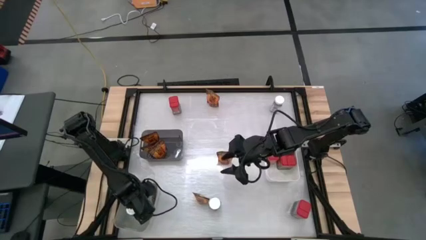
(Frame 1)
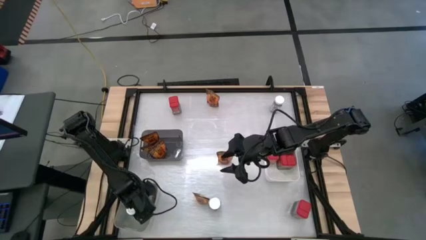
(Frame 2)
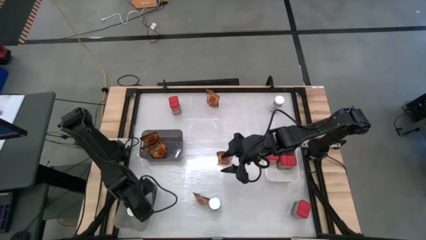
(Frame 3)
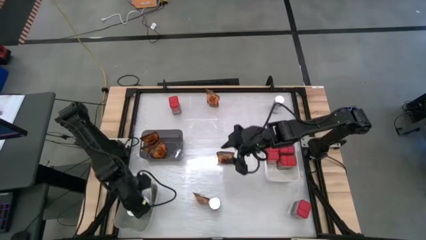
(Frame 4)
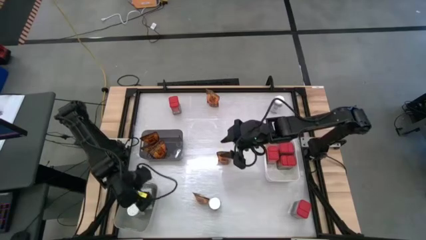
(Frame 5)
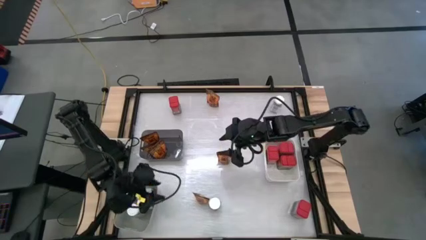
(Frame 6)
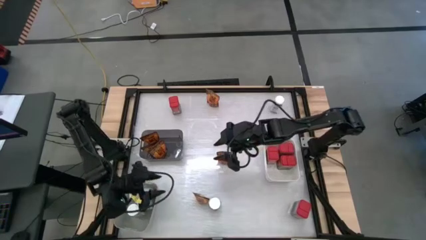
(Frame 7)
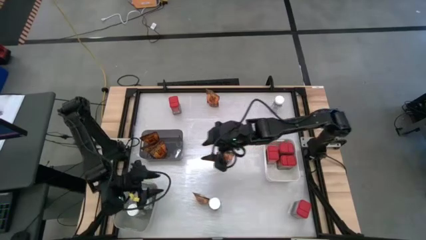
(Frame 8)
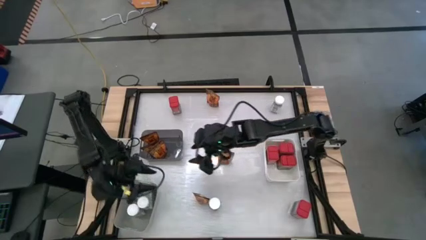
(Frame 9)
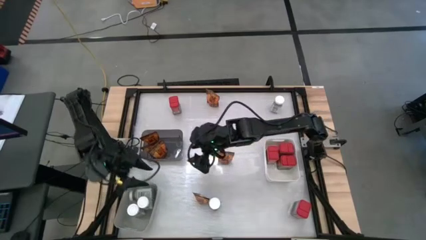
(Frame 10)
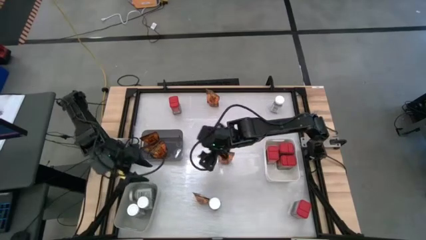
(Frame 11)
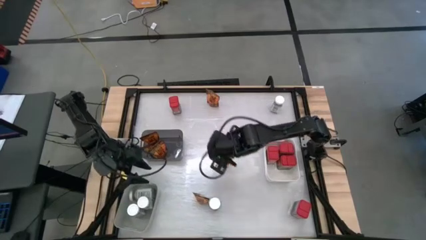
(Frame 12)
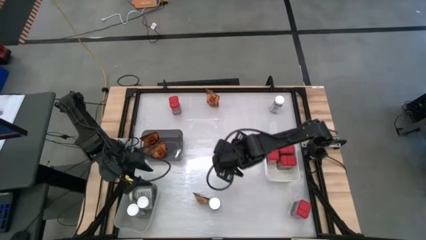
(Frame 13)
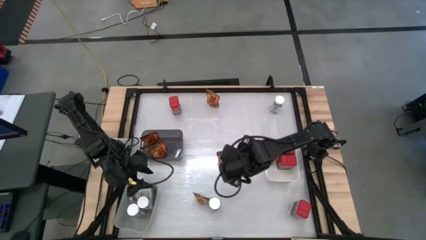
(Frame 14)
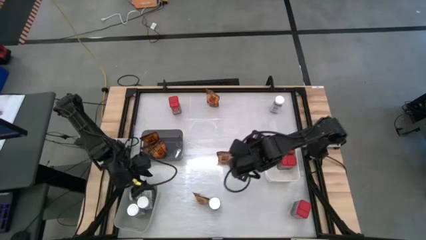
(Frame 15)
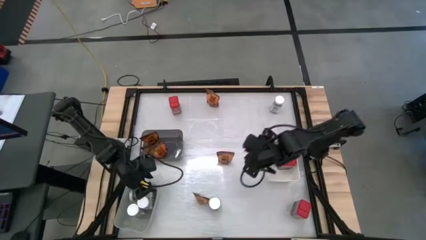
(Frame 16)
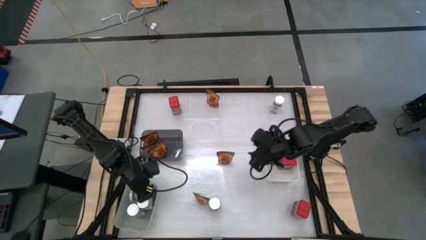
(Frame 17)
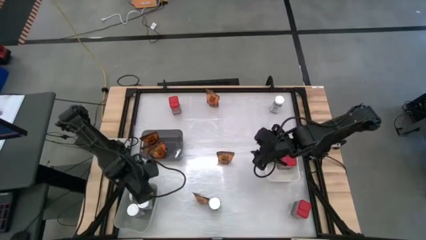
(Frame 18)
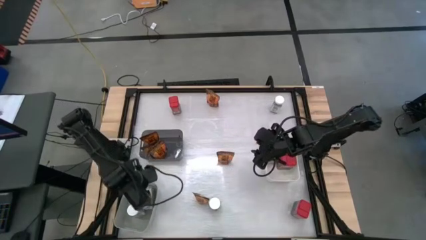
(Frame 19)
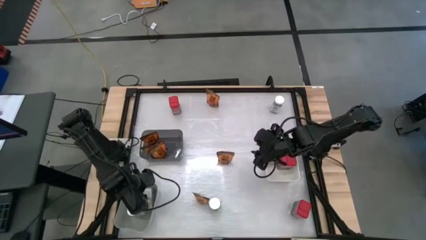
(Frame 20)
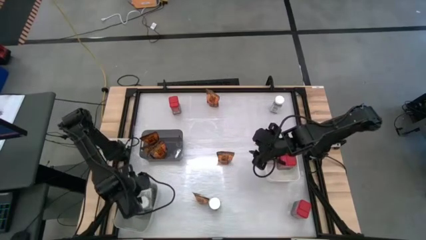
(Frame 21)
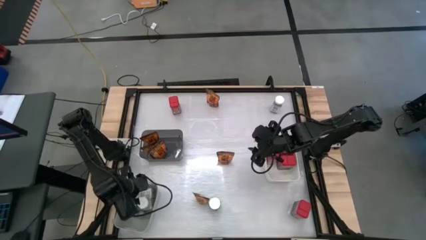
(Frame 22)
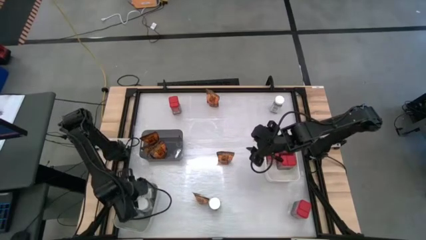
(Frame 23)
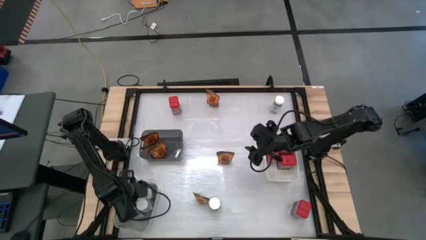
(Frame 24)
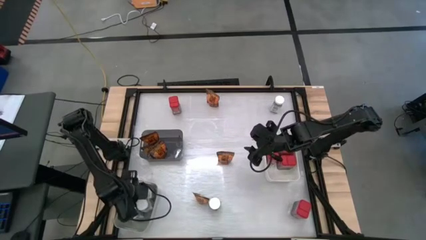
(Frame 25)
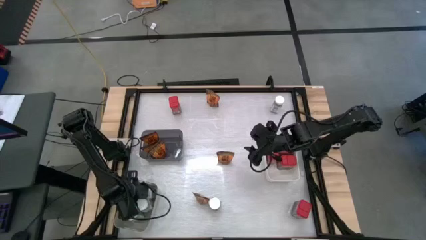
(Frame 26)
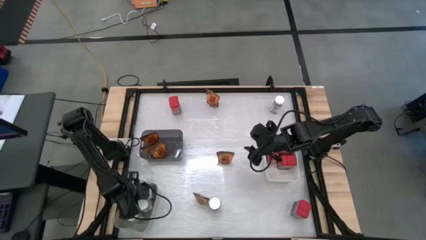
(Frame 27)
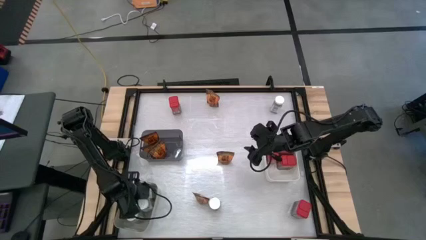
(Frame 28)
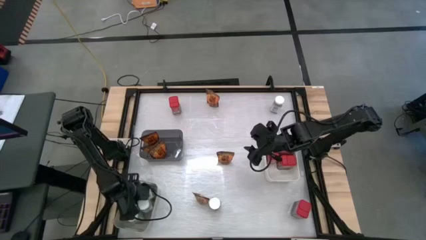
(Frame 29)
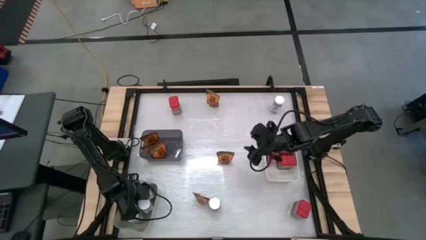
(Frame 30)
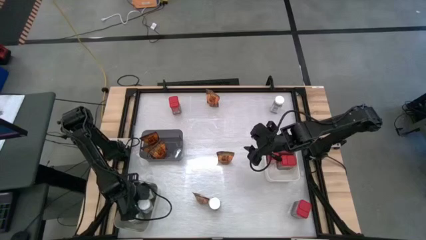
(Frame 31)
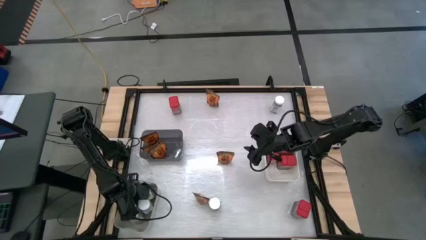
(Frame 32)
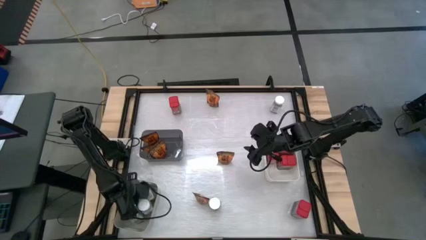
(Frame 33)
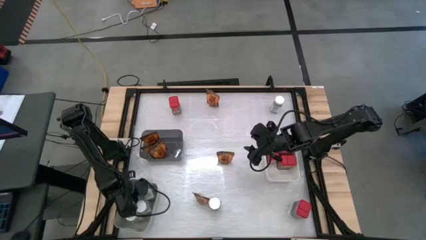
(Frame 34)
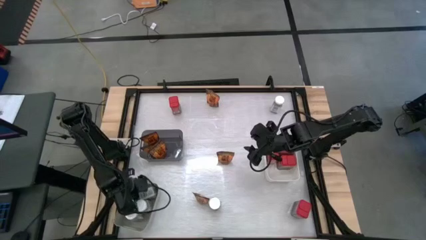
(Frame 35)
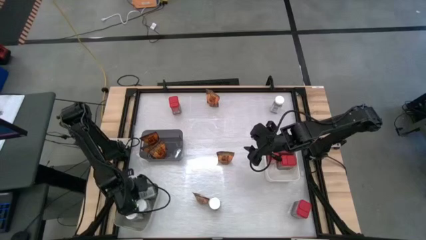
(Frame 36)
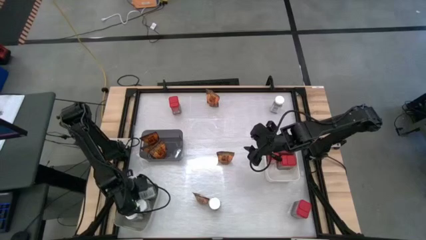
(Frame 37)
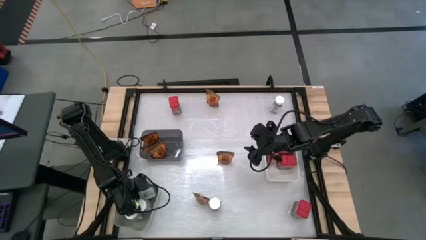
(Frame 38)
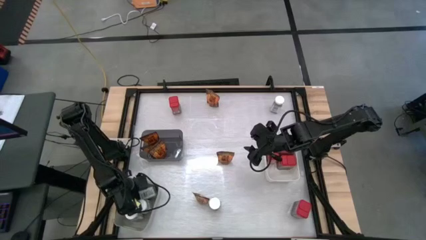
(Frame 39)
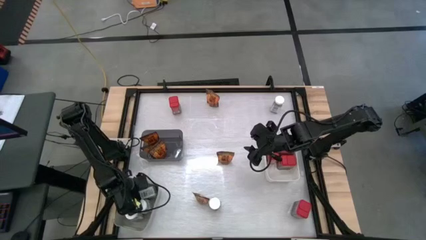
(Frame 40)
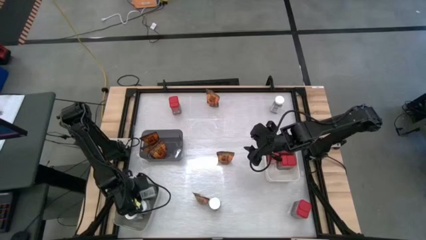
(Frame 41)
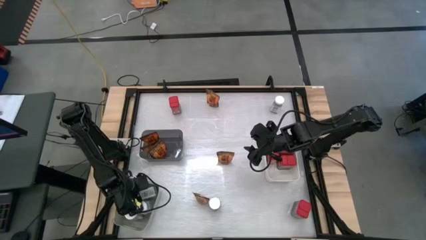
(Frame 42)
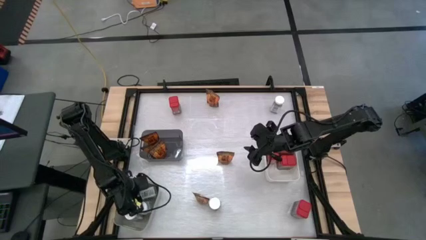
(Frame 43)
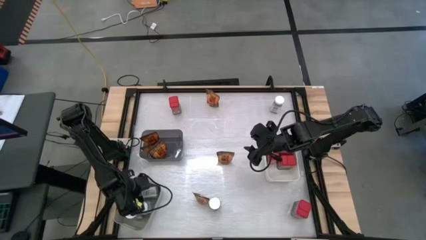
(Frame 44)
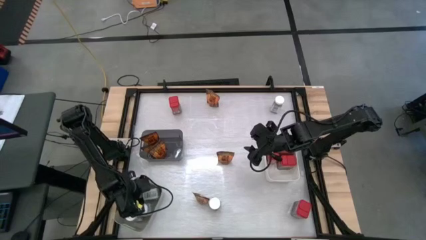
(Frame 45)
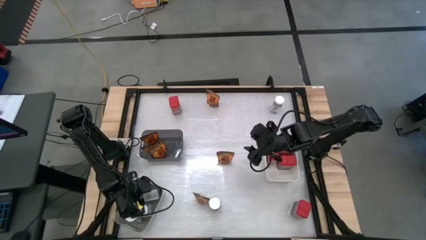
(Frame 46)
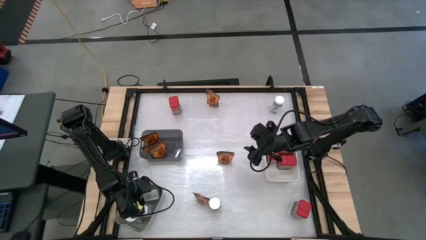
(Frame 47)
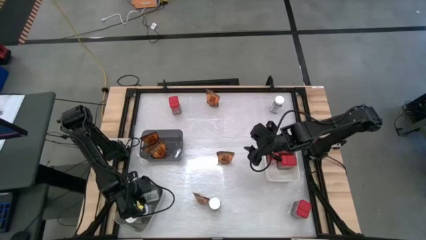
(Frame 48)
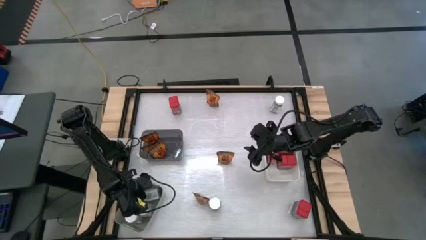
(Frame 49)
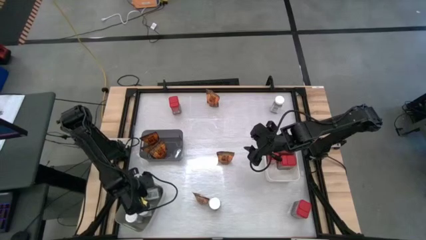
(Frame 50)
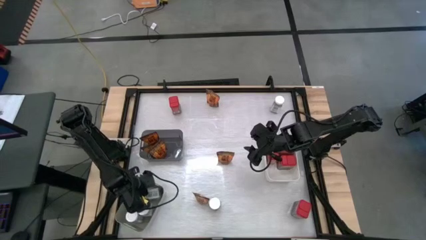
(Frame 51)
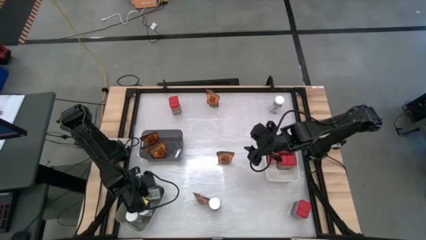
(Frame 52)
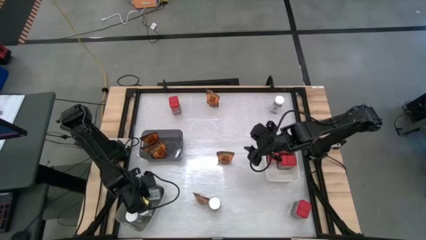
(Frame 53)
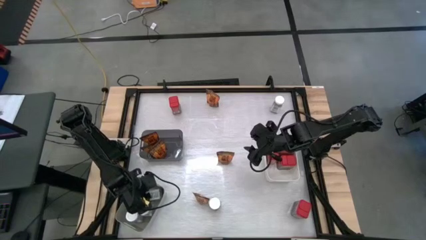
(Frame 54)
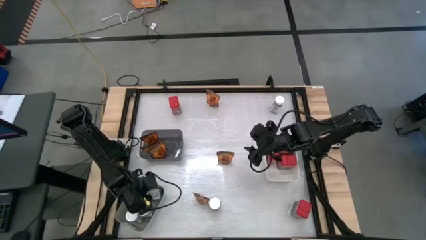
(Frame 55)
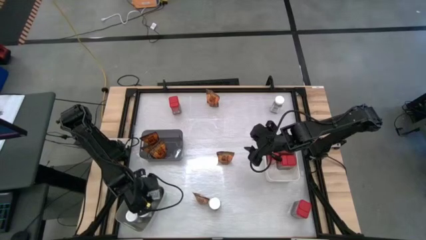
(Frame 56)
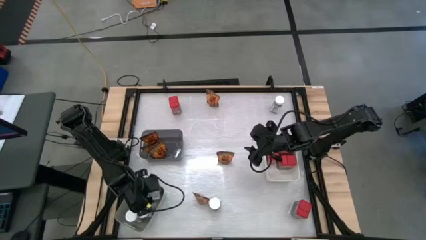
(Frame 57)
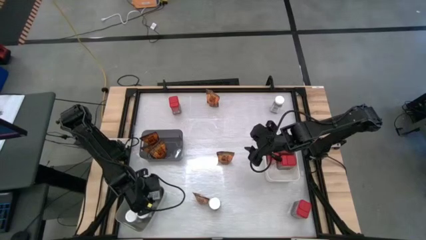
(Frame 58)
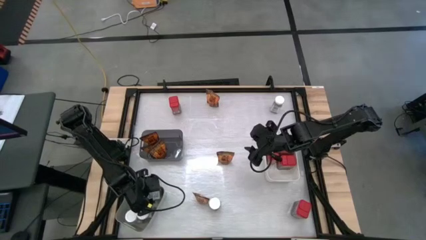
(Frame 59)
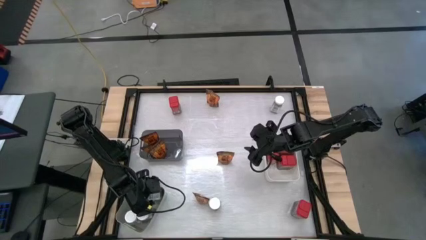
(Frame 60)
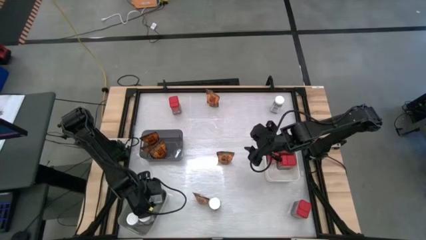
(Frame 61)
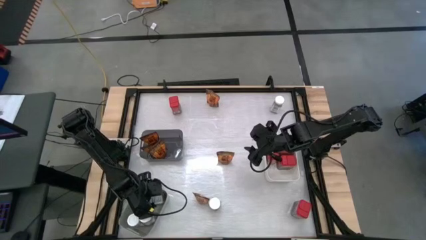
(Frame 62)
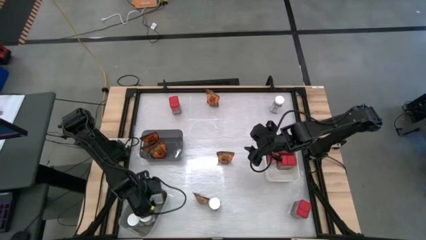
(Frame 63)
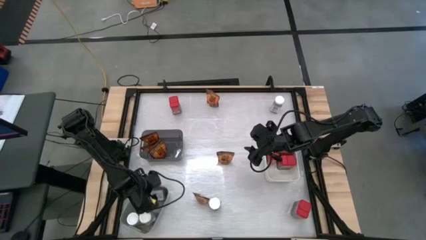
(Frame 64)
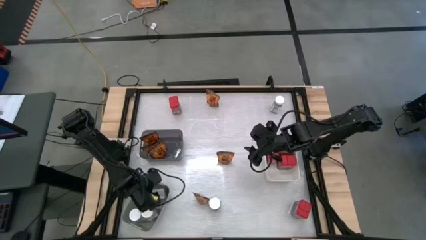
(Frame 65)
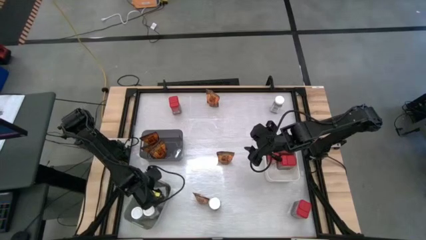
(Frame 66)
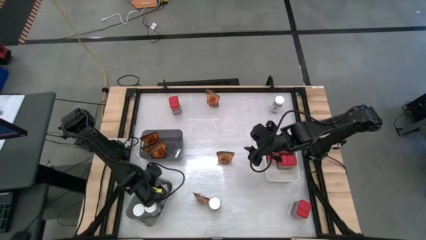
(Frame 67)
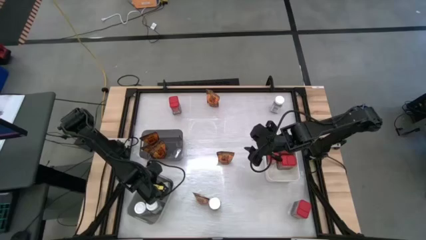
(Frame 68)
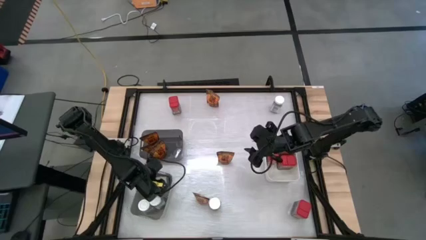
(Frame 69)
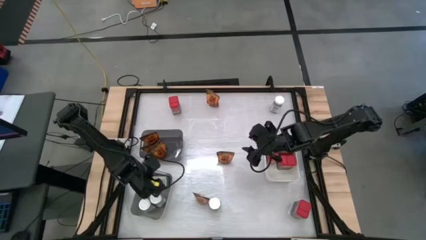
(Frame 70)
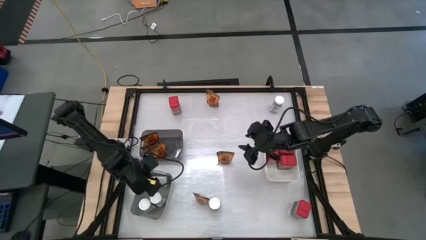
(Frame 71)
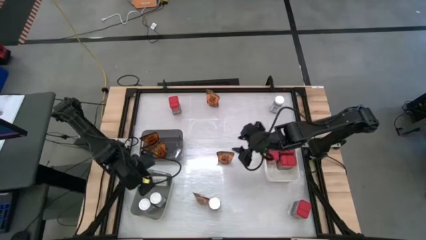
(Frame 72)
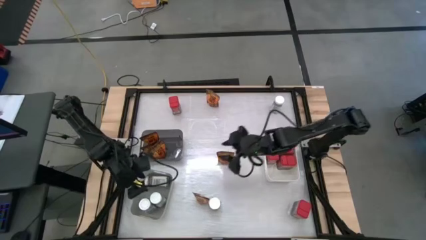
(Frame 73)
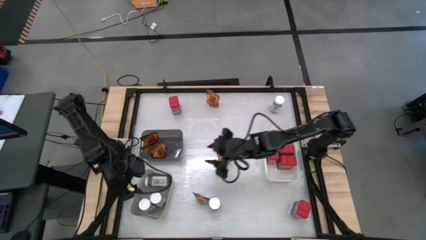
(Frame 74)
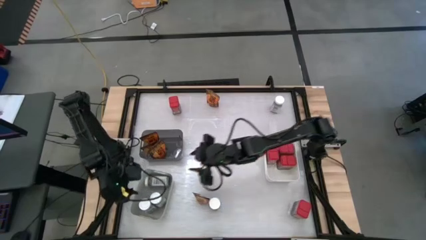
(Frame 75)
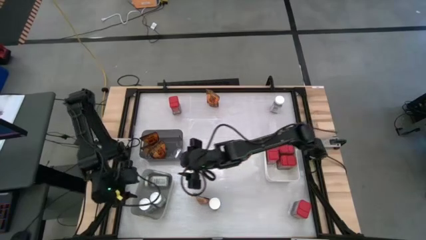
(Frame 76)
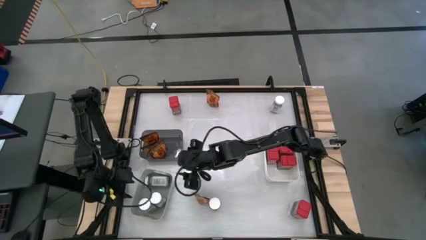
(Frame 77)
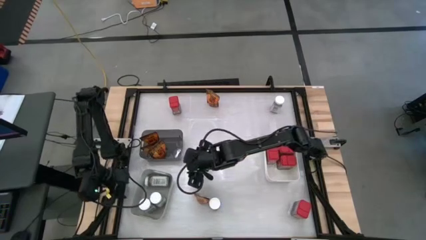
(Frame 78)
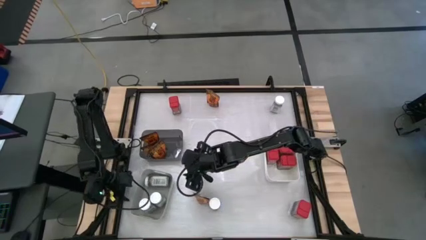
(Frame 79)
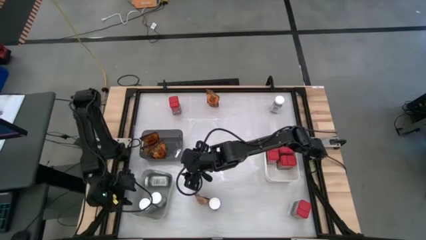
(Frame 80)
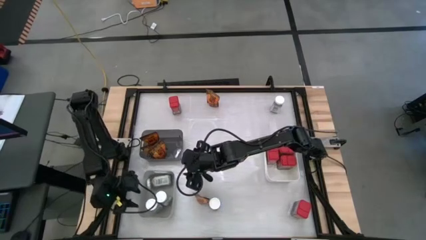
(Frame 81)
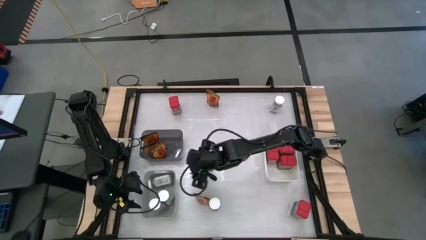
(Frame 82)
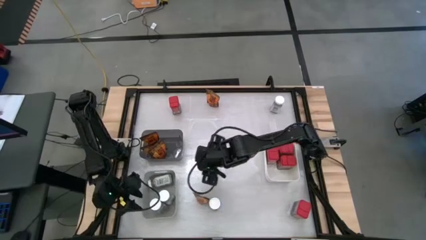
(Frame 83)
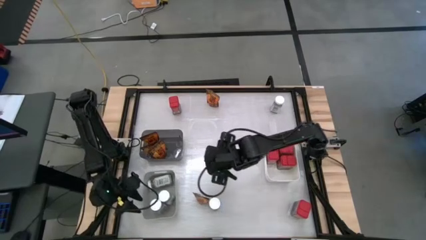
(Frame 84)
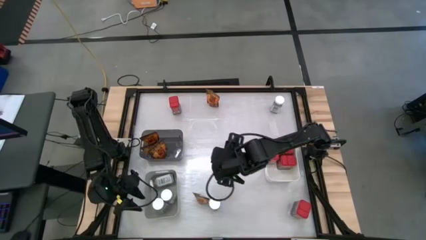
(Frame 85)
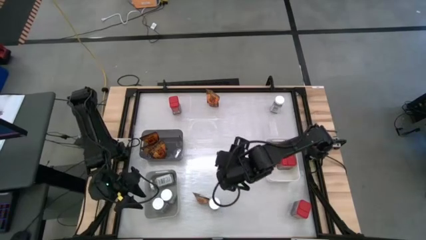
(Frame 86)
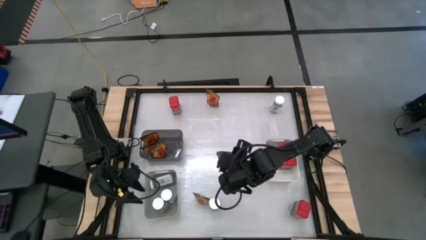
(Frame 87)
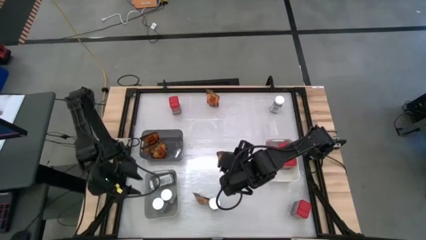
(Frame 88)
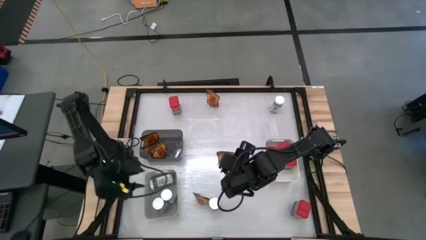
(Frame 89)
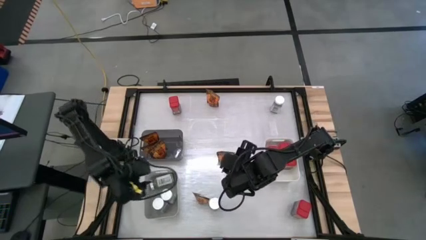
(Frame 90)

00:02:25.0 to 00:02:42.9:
Task: Sort spices by type
Adjust the white spice bottle inside the gray bin
